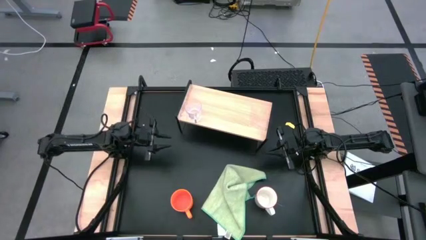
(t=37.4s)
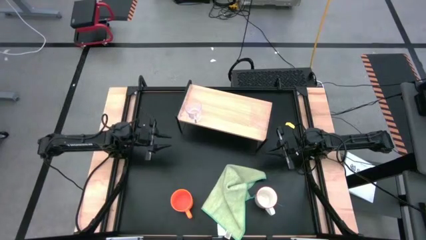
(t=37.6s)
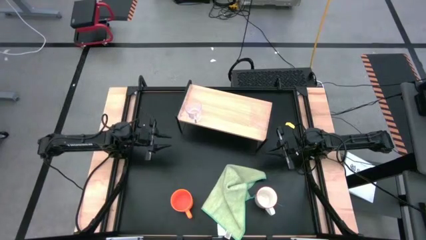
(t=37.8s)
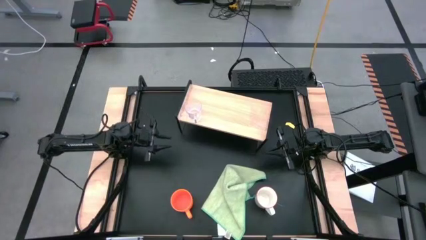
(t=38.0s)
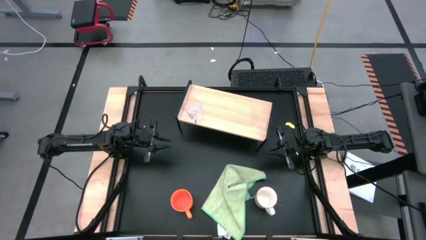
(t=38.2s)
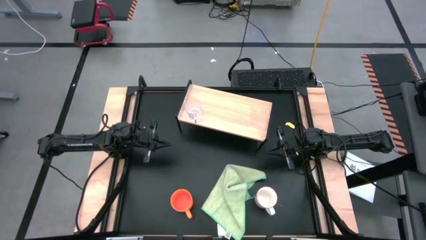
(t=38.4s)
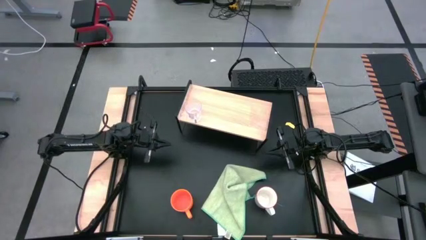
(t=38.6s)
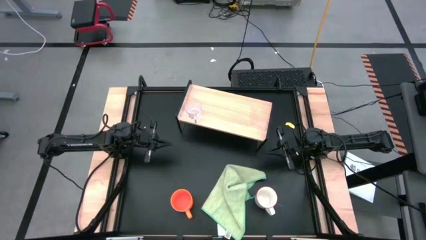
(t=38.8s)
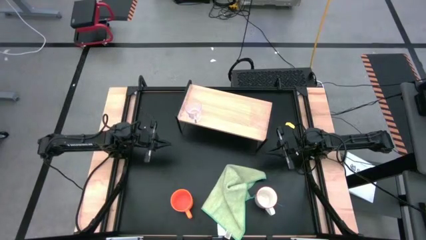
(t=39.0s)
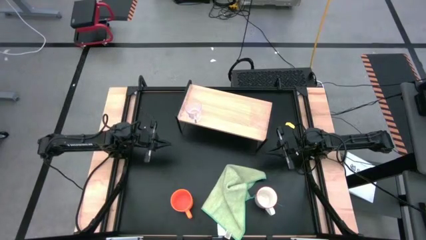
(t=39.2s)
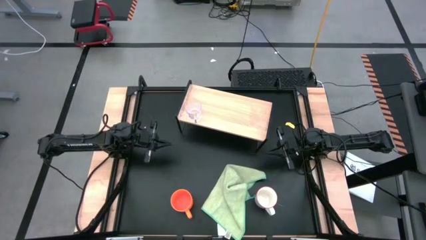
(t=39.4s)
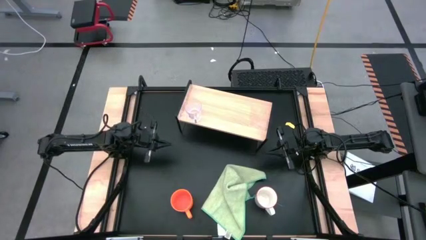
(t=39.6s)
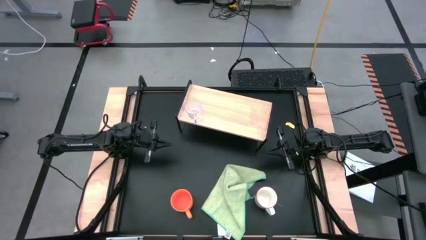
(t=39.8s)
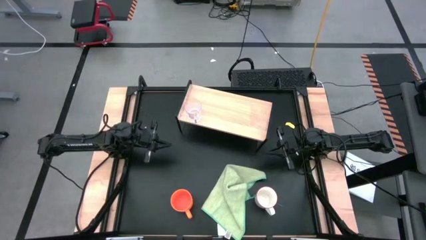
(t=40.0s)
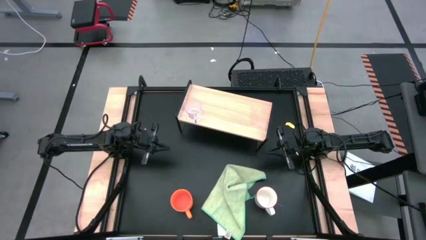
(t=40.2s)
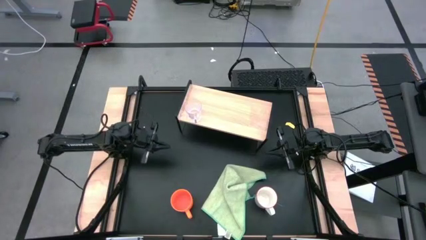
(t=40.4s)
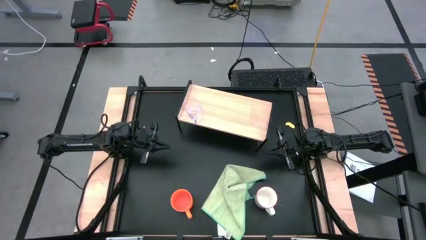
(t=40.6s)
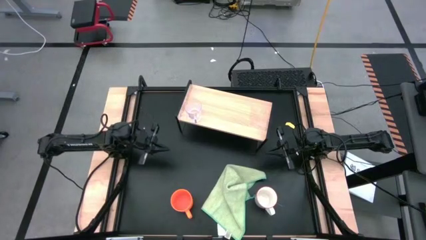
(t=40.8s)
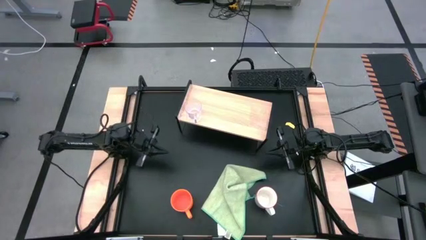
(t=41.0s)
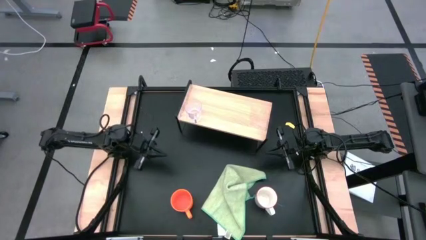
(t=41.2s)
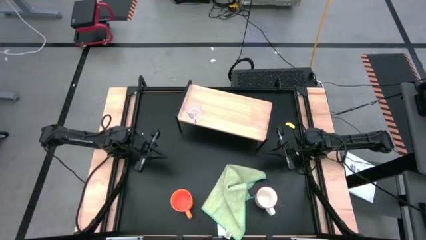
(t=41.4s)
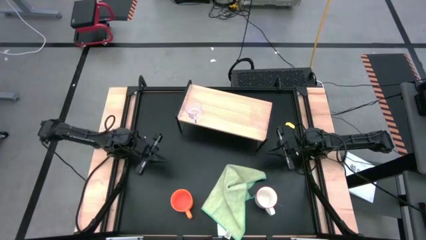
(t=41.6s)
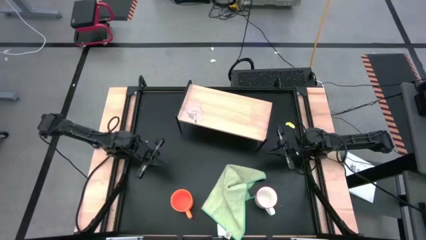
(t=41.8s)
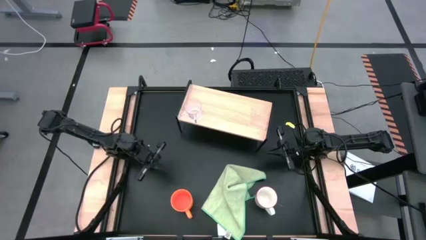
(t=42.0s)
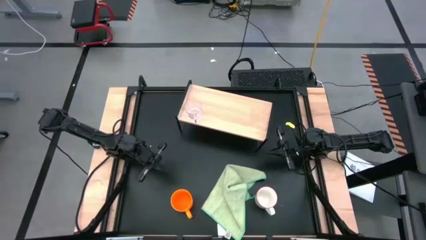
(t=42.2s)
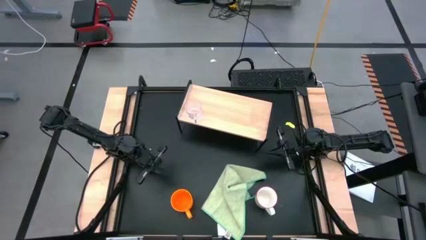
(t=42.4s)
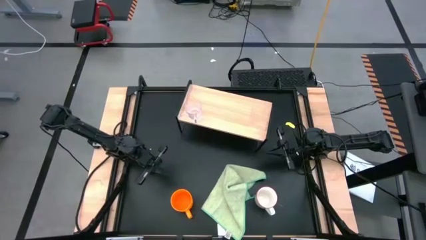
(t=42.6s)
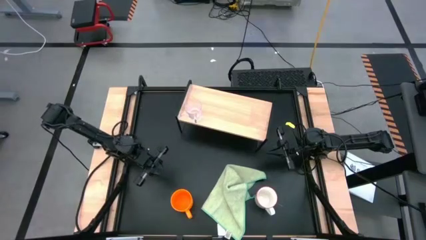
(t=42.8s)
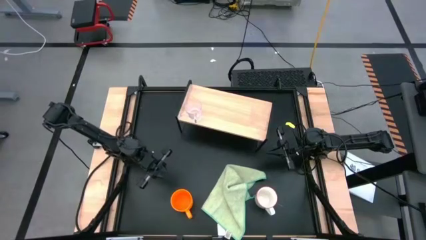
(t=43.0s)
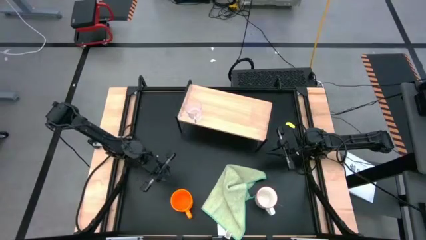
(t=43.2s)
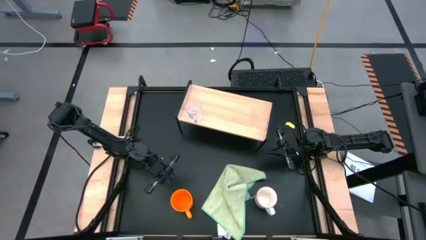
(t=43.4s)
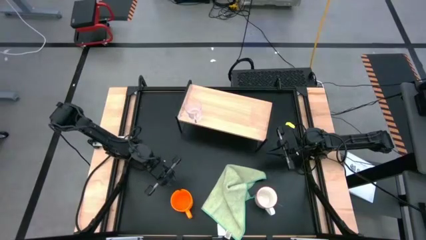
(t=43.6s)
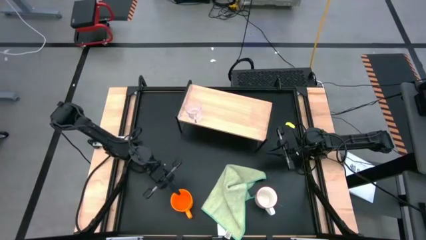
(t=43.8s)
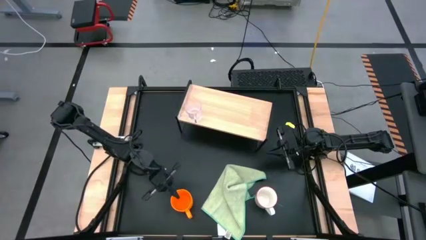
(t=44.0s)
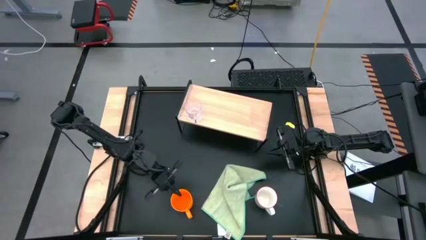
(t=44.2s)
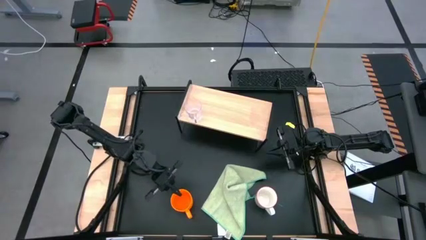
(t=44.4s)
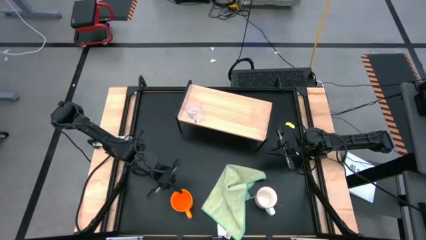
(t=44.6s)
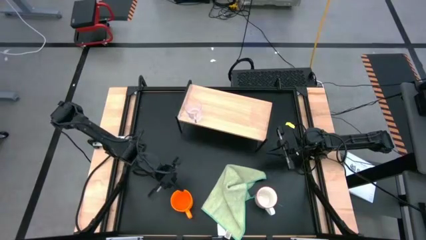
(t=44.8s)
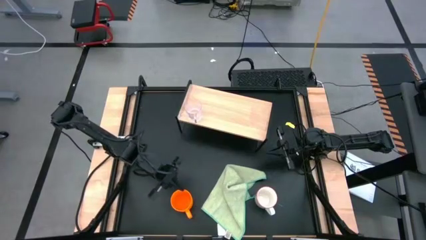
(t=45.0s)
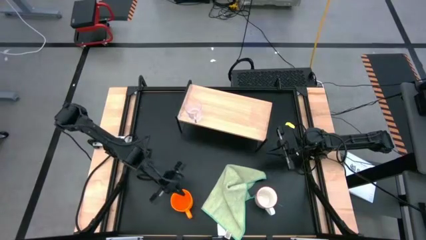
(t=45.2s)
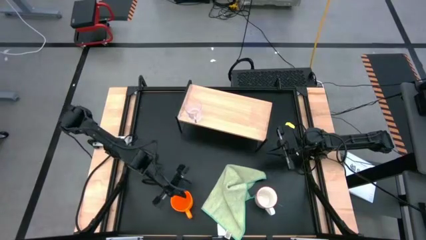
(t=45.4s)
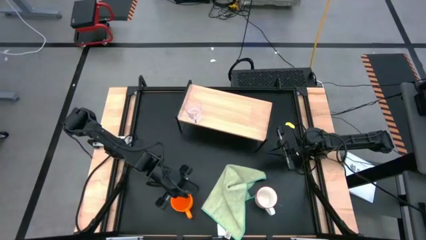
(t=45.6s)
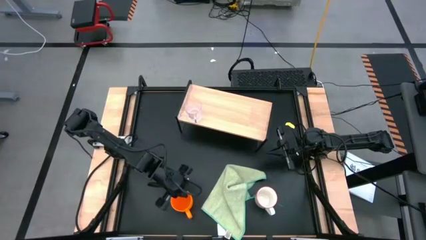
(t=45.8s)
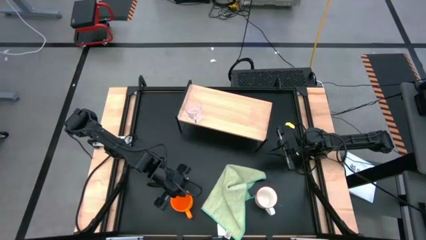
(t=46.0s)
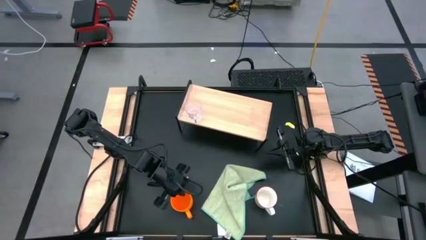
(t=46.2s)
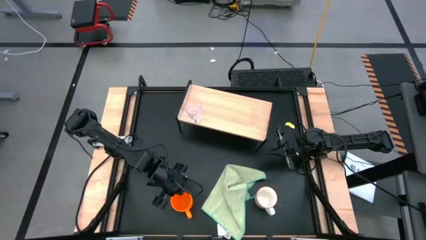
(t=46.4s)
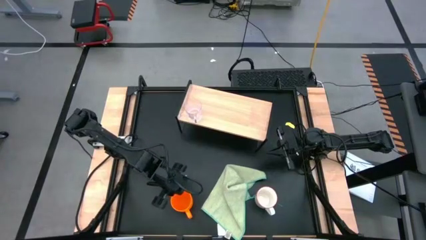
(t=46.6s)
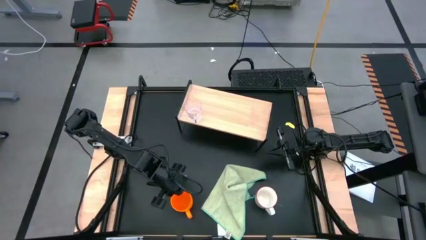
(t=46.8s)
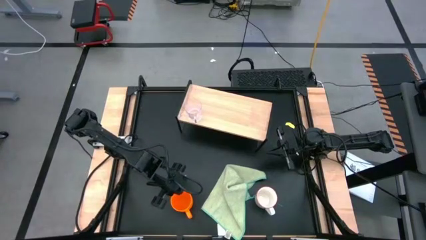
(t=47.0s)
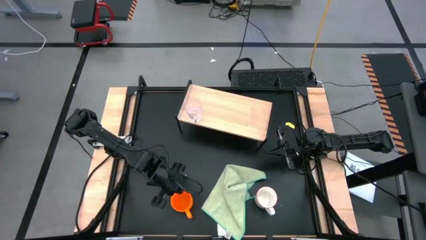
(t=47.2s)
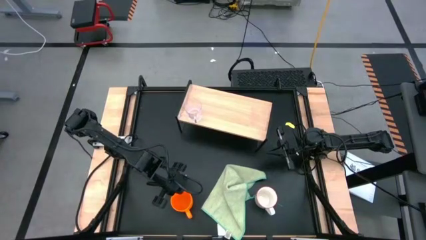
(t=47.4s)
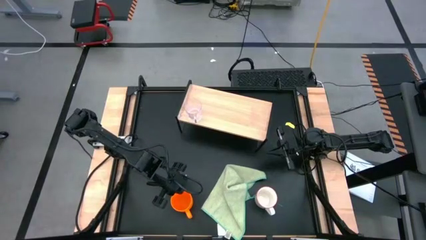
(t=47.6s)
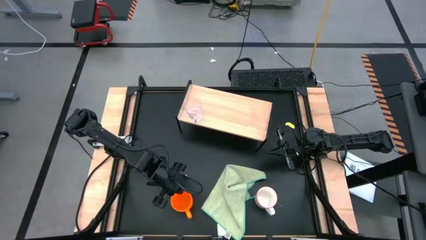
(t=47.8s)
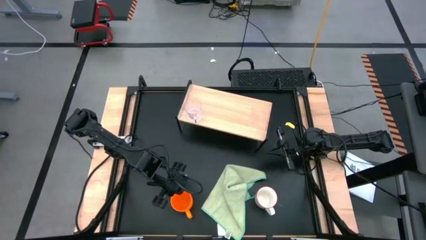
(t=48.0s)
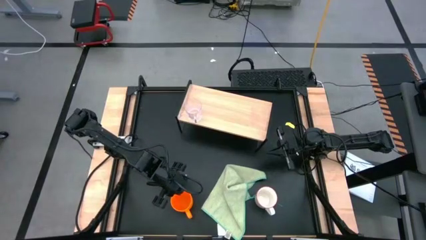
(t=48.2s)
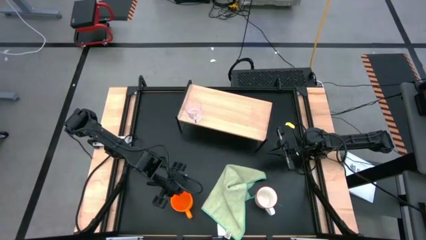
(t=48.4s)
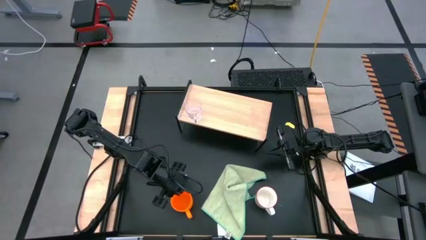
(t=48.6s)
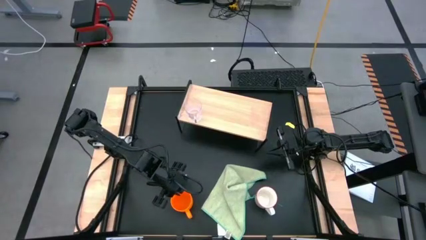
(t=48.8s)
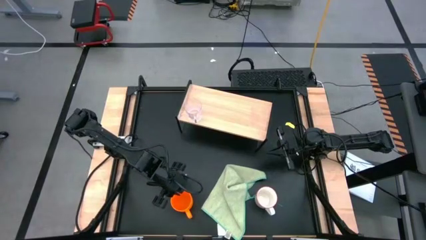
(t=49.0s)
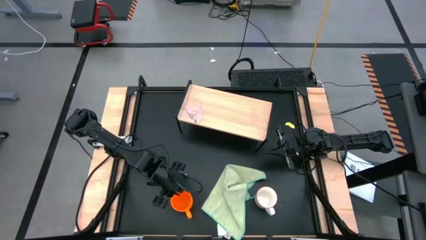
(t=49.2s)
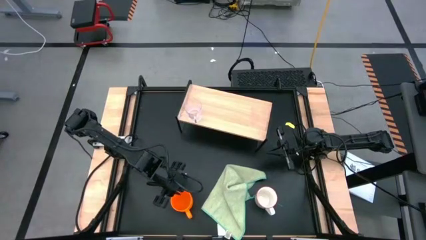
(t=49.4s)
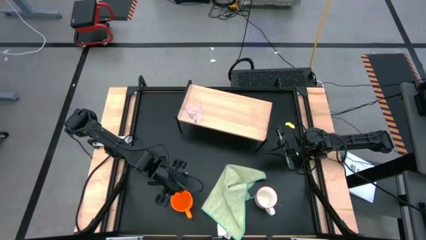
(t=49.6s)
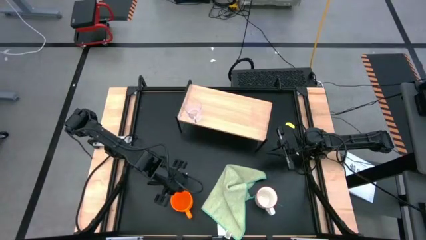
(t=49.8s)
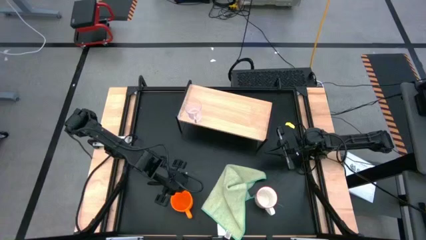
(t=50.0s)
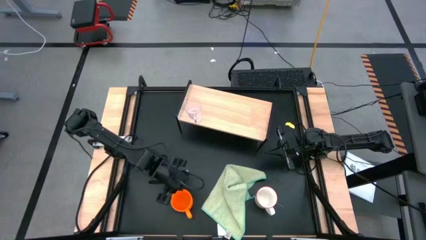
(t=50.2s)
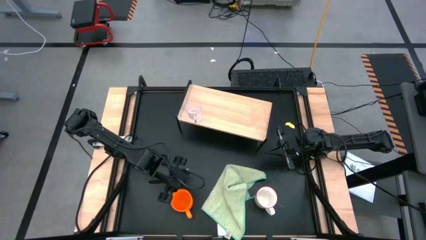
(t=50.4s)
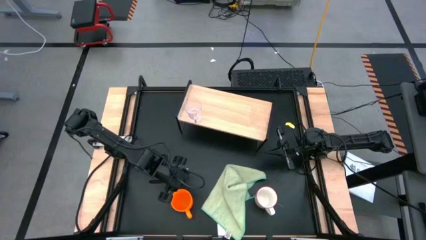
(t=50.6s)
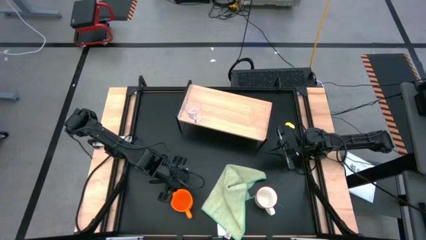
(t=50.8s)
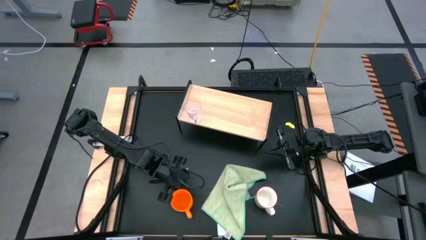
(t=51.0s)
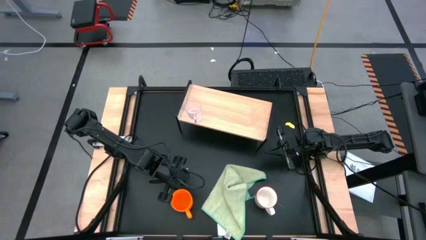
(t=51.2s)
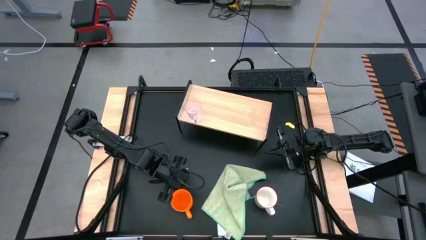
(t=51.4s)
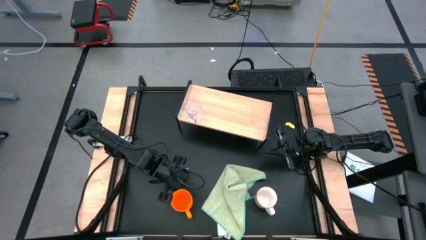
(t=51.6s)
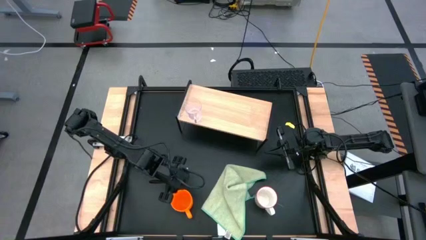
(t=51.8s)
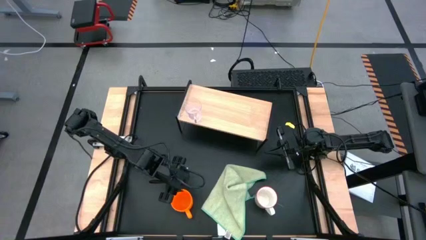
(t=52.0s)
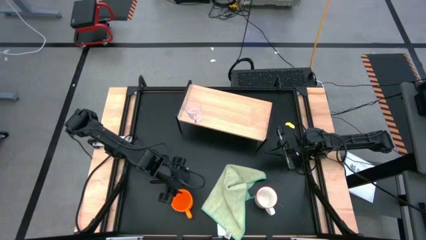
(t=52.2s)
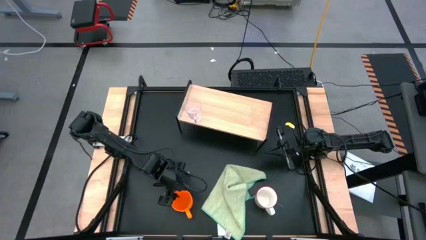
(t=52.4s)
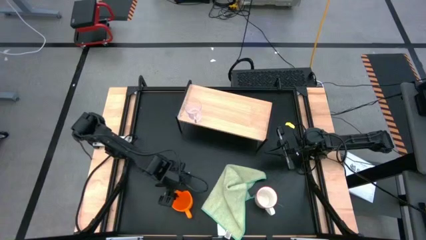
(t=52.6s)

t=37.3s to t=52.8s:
Task: Stack small to large cups/mugs on shelf
Put the orange mug on the shelf

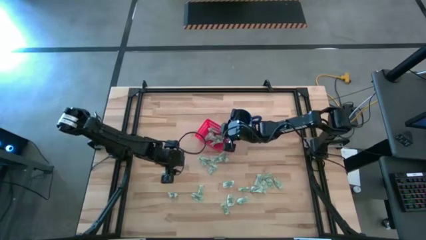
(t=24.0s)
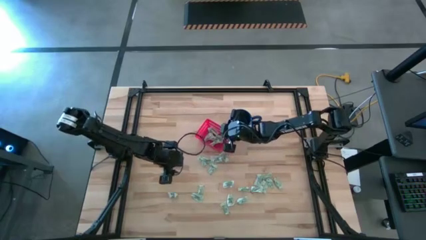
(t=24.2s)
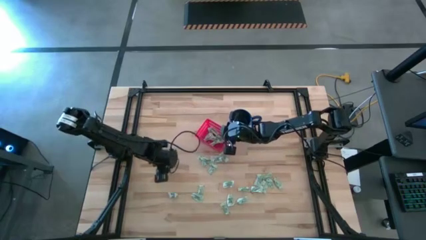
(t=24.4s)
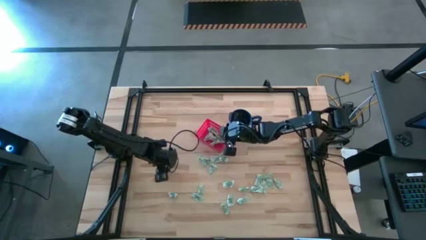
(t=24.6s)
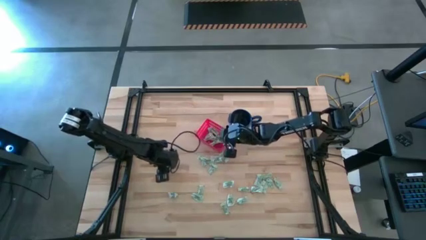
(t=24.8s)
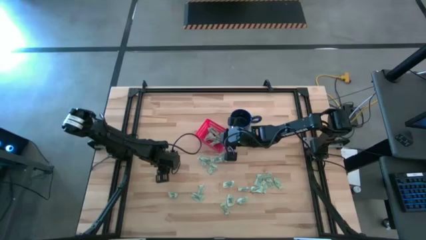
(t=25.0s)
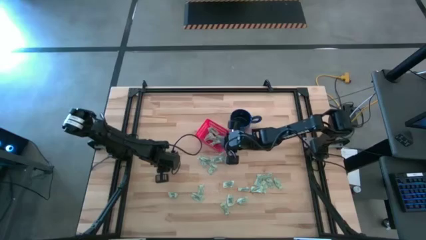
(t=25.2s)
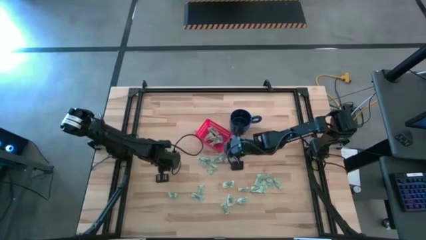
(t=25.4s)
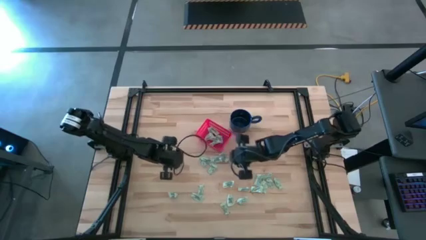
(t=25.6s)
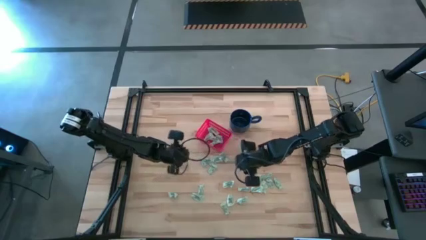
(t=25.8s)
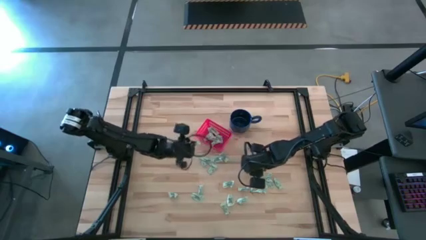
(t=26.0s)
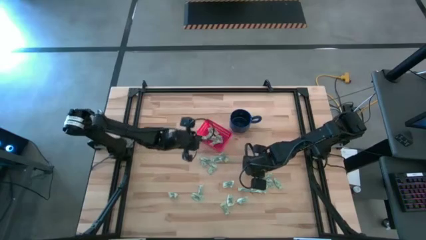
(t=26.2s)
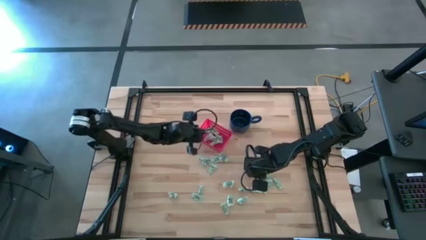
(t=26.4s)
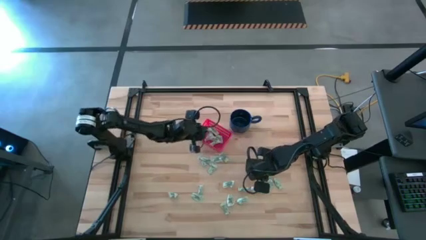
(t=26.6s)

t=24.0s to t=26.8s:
Task: Pick and place items into bin
Put the stevia packet into the bin
